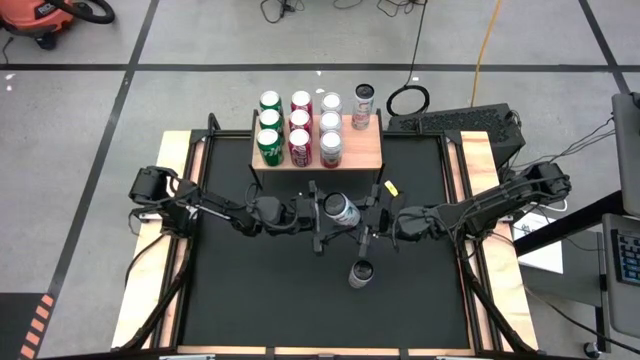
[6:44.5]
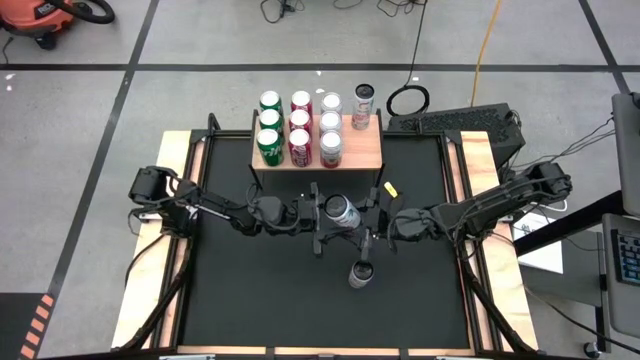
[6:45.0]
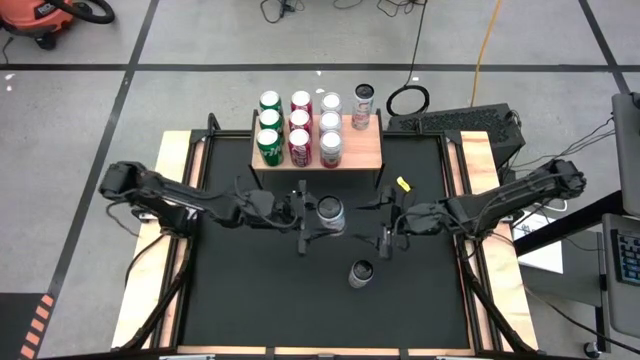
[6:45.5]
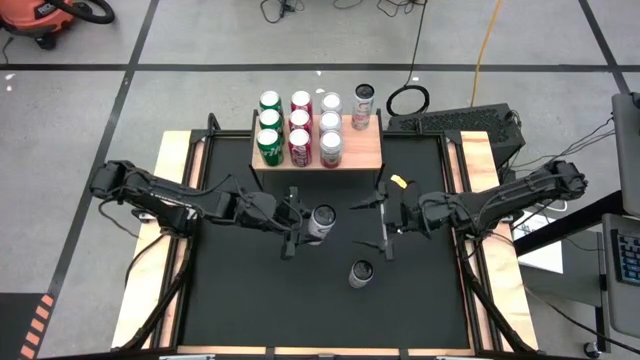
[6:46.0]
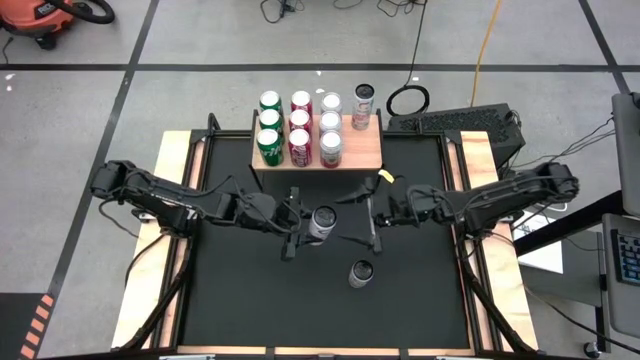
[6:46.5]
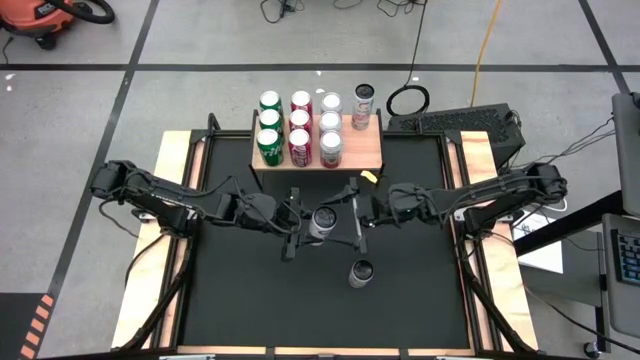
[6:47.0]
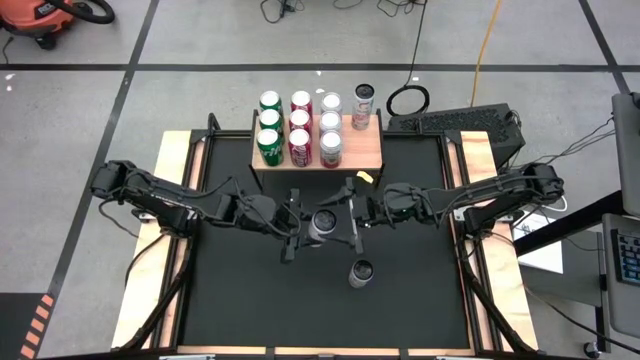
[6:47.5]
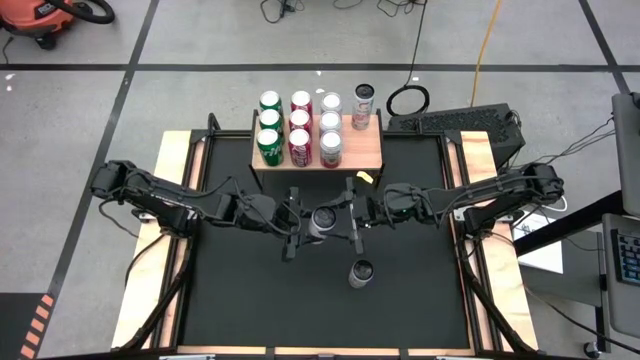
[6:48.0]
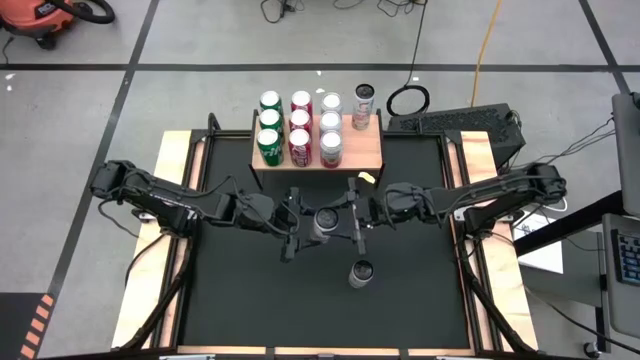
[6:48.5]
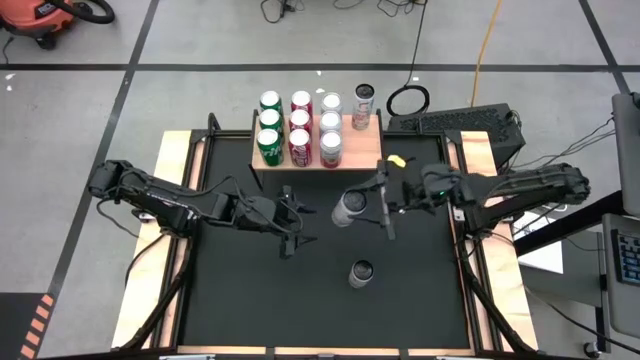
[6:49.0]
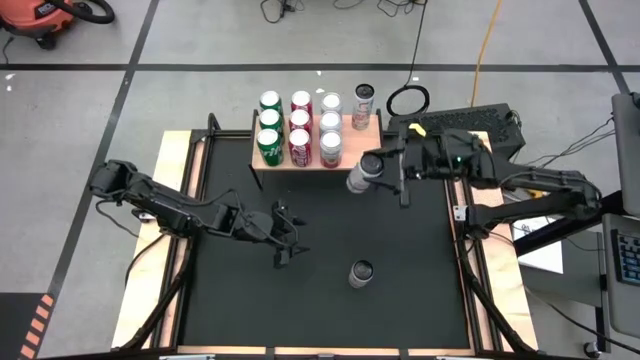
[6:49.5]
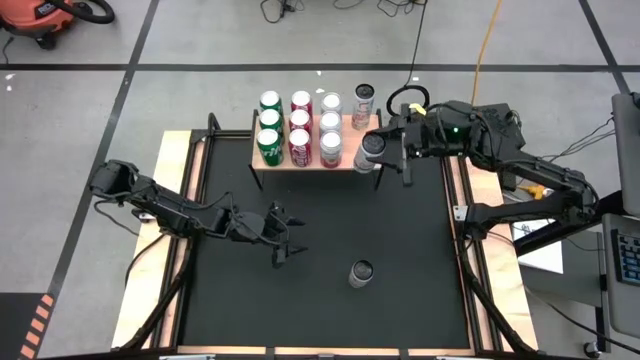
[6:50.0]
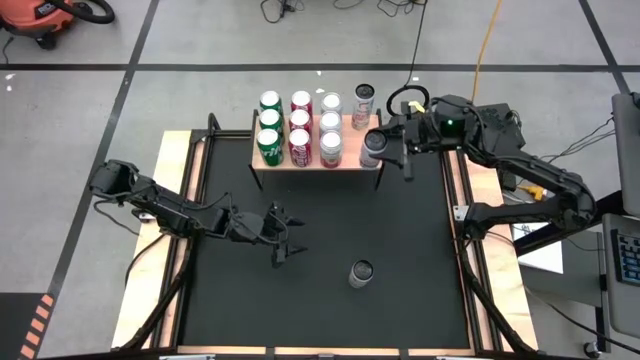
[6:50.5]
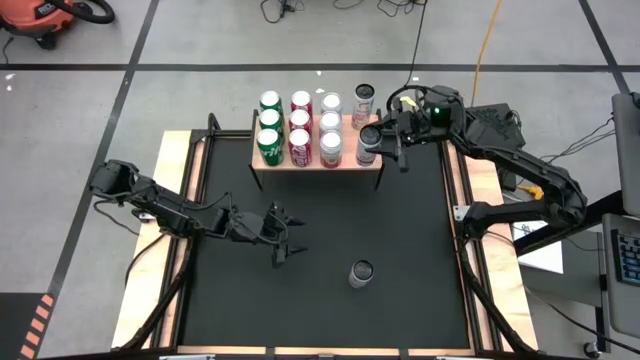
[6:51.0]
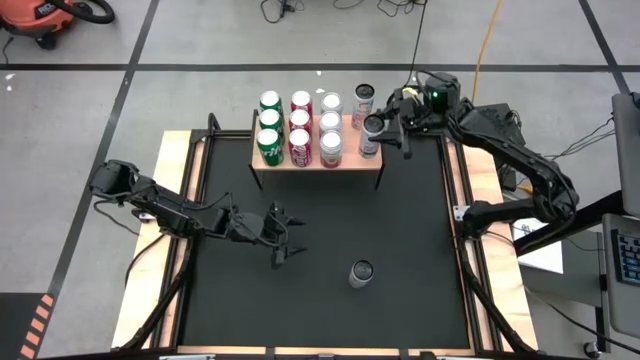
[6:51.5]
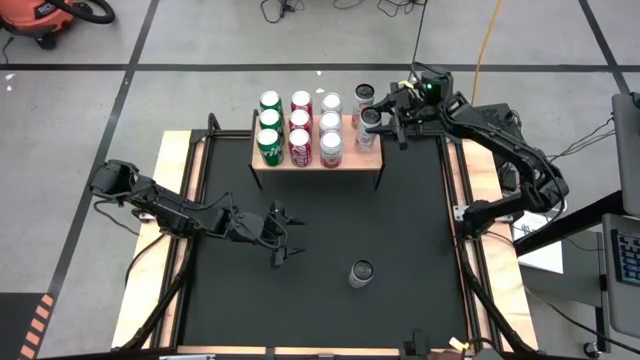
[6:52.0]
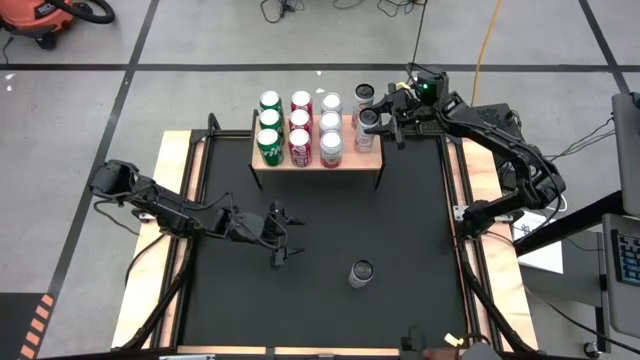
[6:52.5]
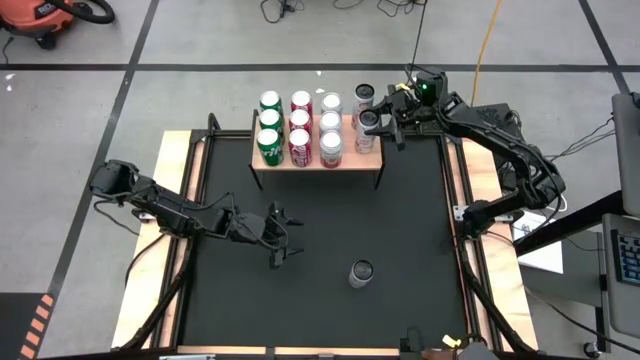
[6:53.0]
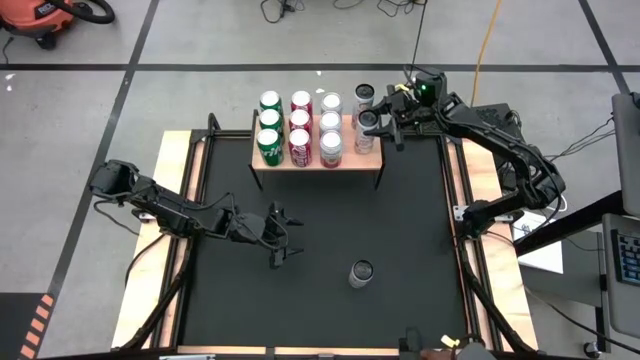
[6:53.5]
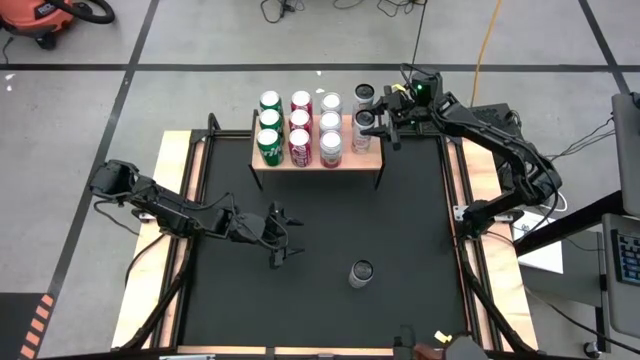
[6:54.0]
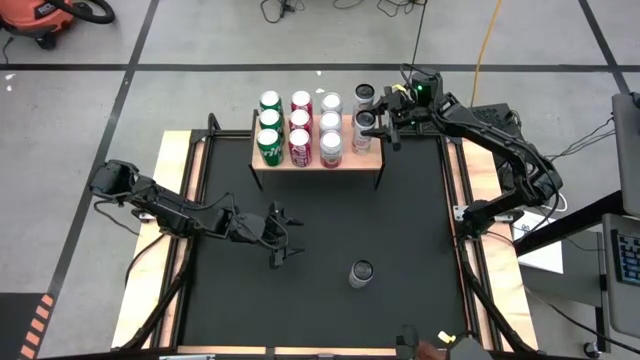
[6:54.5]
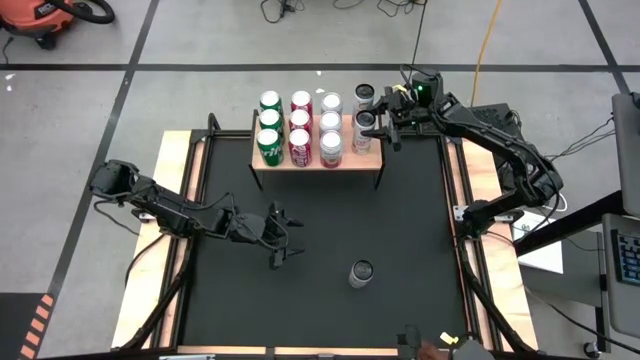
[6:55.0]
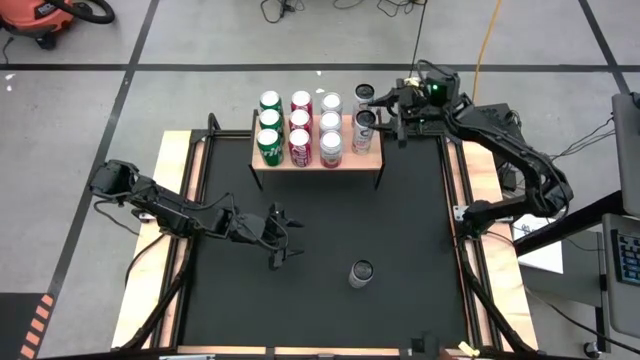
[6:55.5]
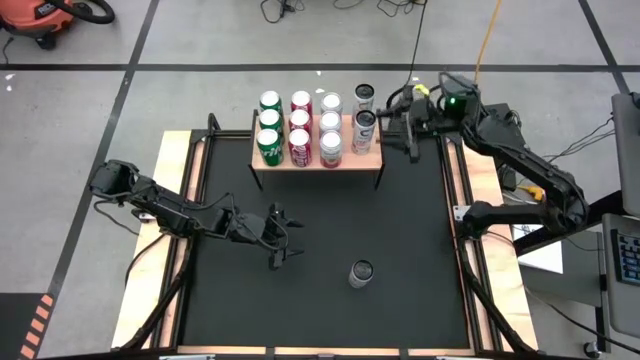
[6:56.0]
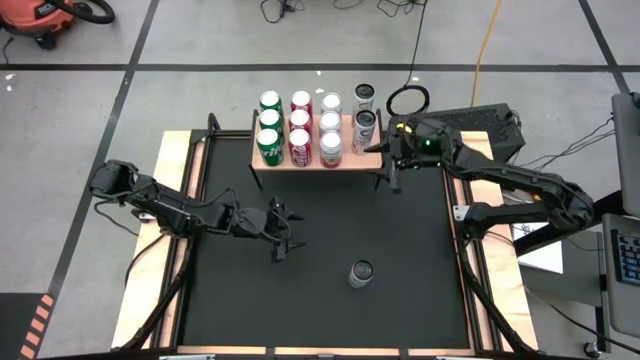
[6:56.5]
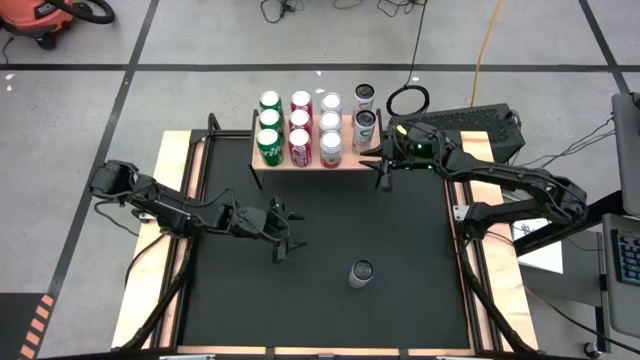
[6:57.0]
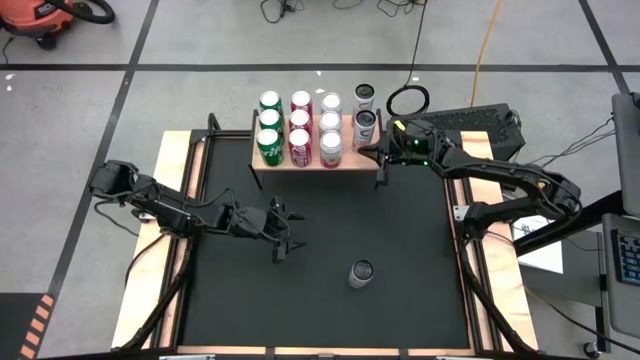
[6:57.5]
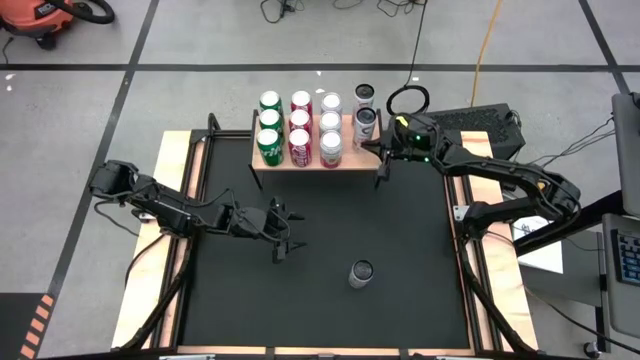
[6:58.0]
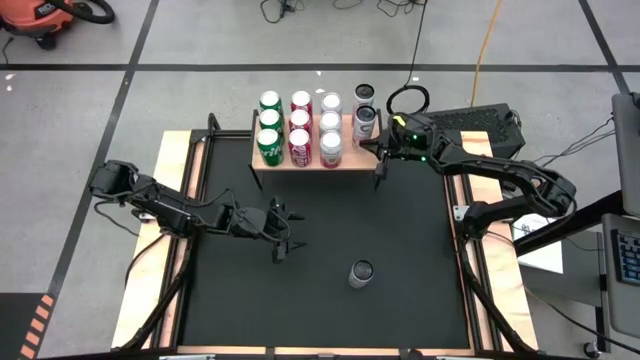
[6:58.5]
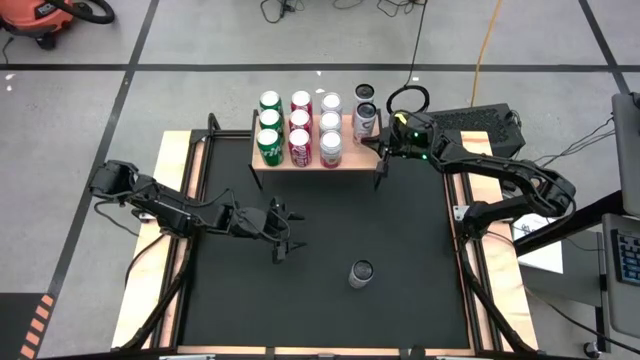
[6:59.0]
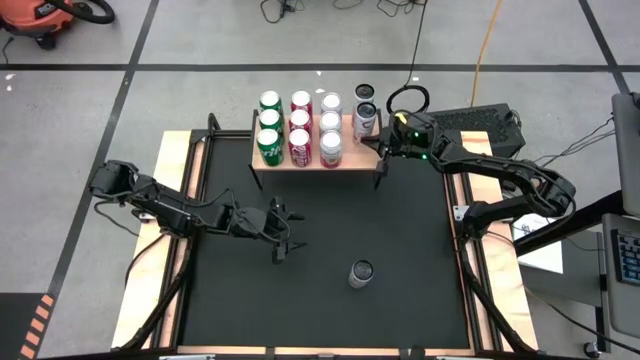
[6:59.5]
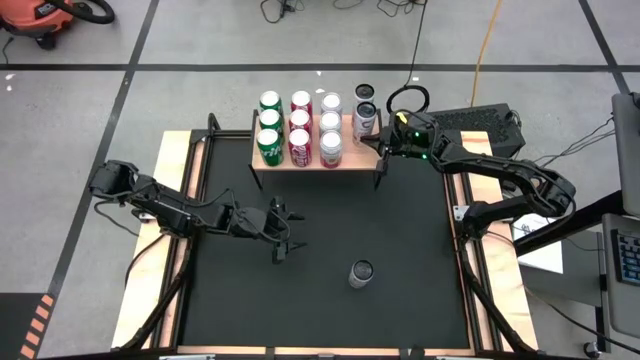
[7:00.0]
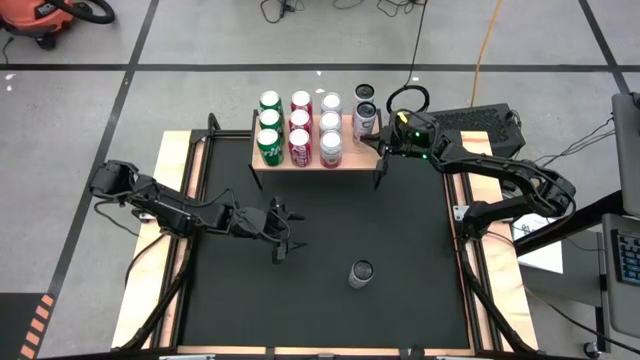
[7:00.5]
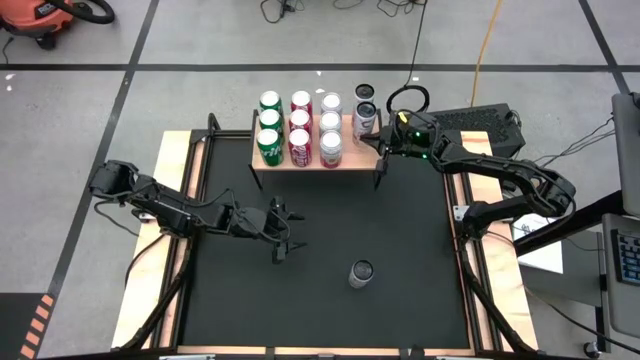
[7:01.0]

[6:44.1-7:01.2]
Task: Place canned beverage on shelf
Put the top white soda can on the shelf aligned with the other white soda can

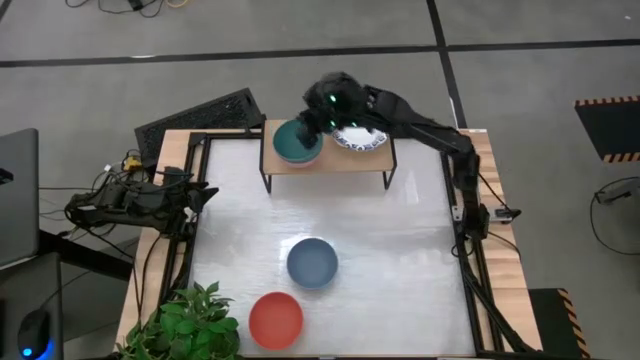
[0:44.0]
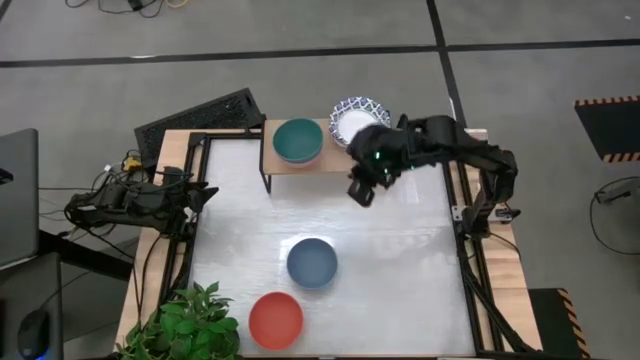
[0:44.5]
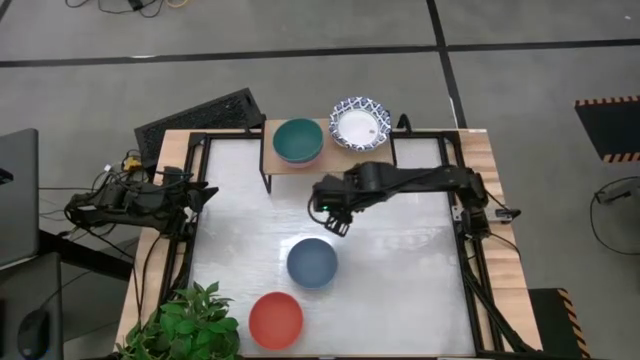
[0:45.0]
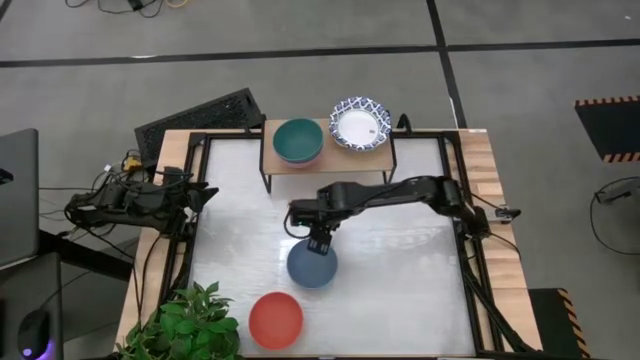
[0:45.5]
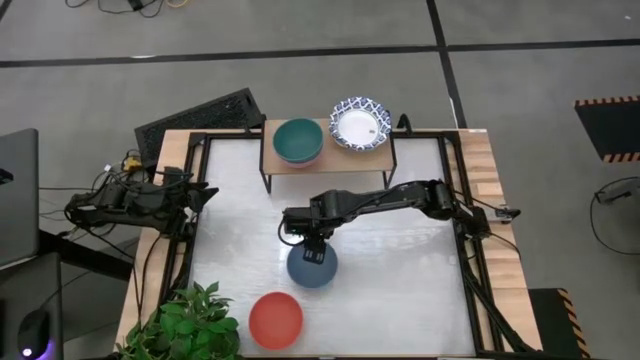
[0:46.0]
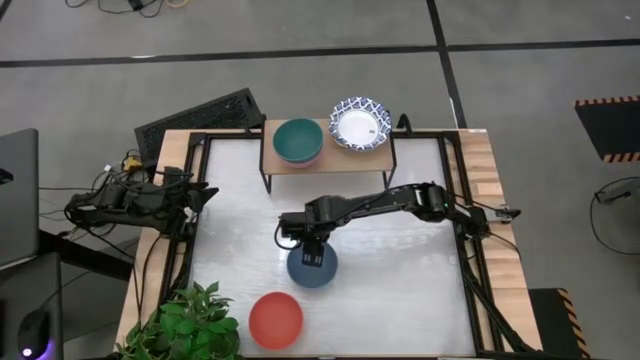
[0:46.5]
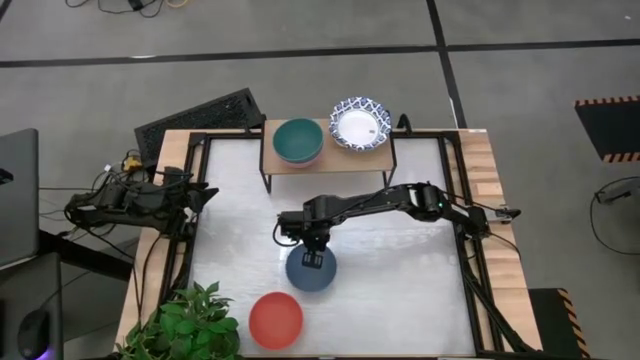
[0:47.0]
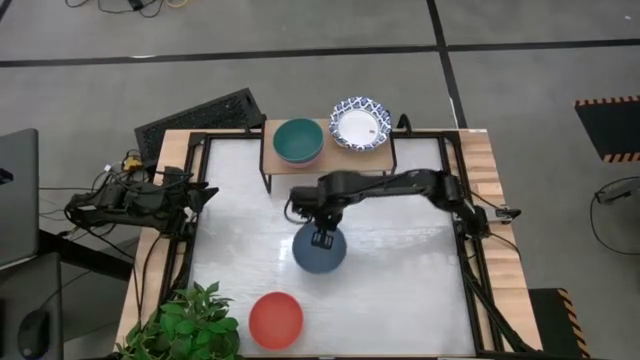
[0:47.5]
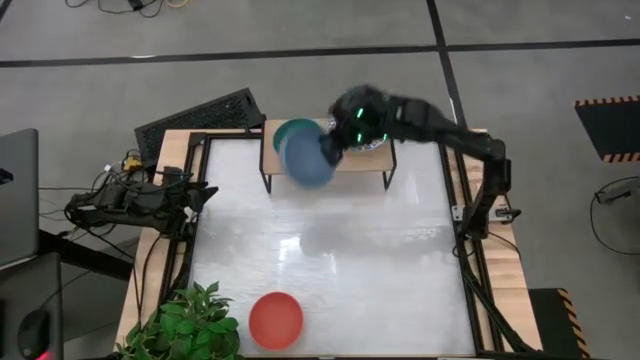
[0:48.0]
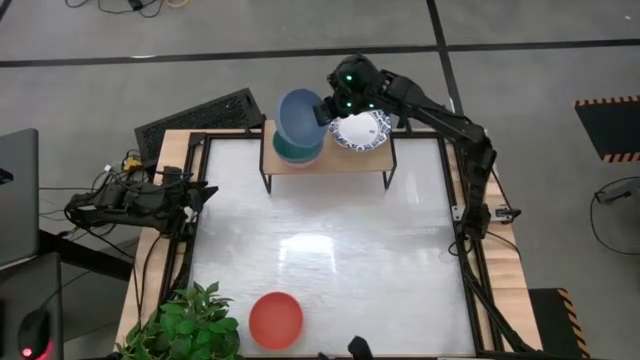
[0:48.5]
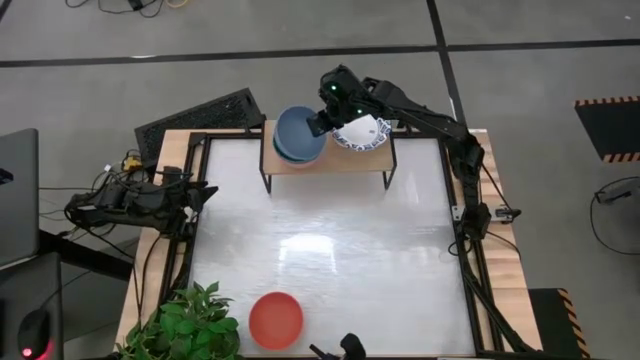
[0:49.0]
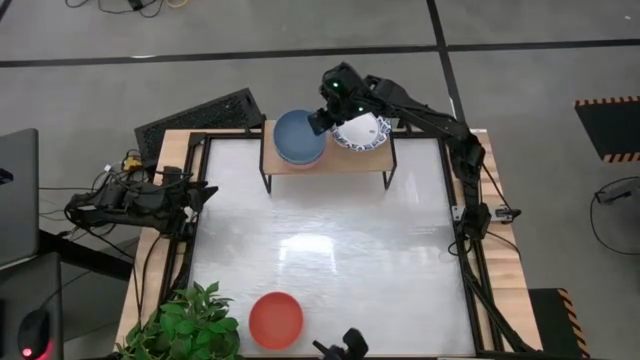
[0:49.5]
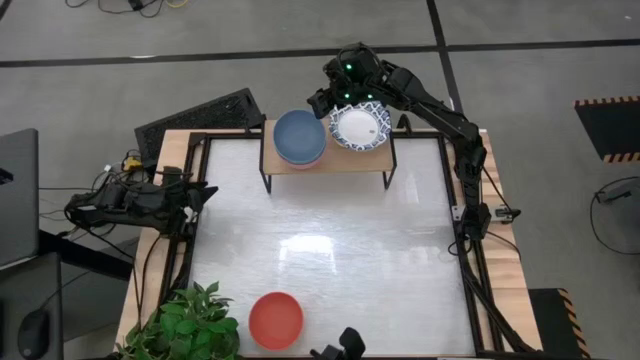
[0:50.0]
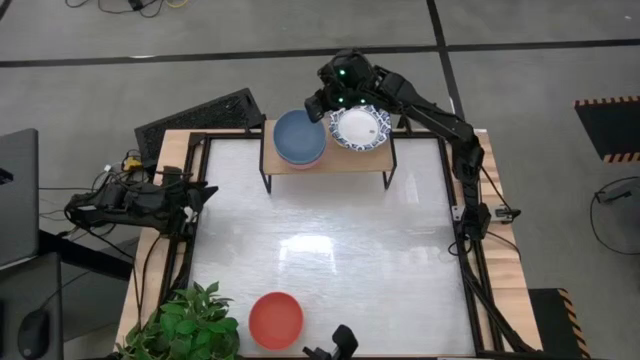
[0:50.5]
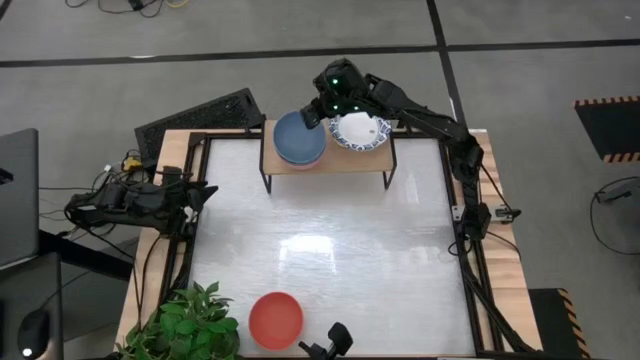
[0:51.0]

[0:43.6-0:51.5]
Task: Place and stack bowls onto a shelf
Stack the blue bowl on top of the green bowl on the shelf
